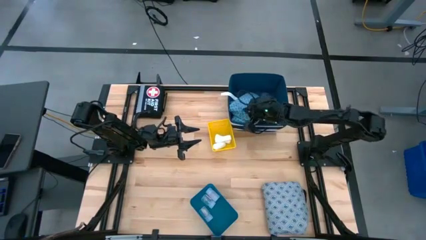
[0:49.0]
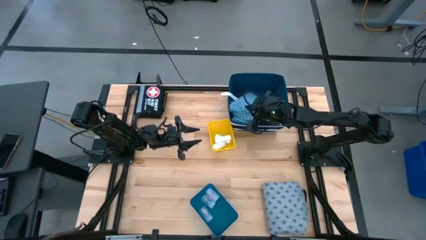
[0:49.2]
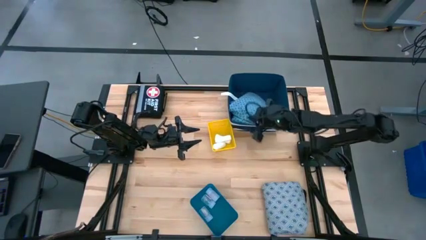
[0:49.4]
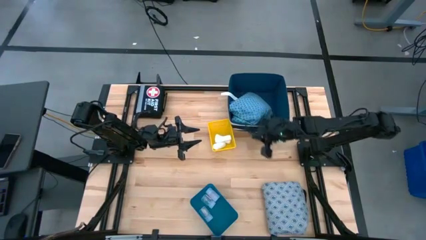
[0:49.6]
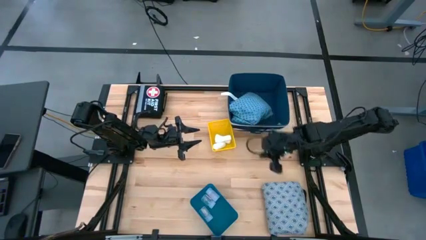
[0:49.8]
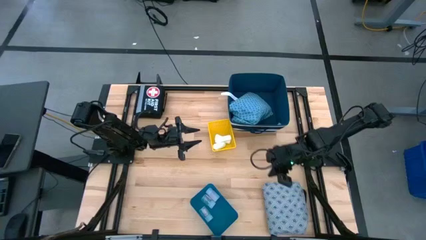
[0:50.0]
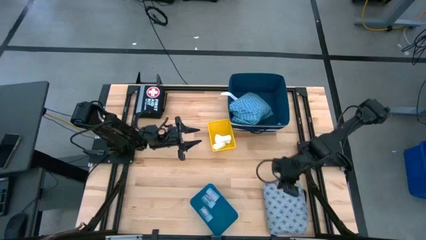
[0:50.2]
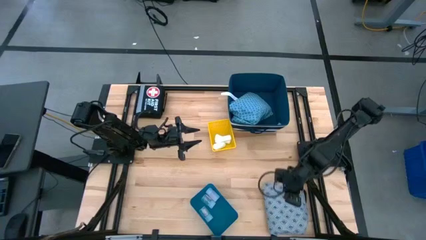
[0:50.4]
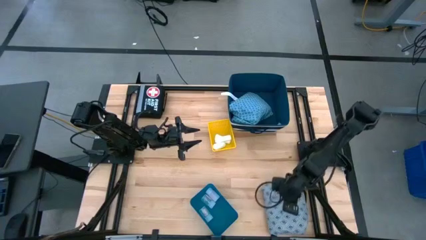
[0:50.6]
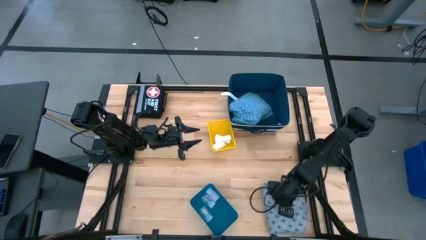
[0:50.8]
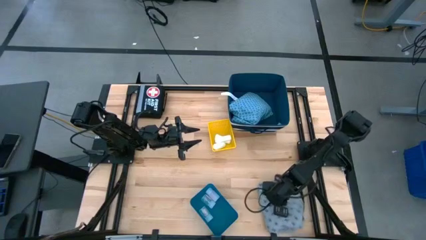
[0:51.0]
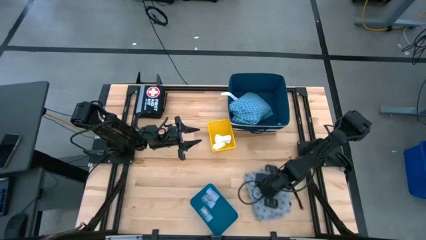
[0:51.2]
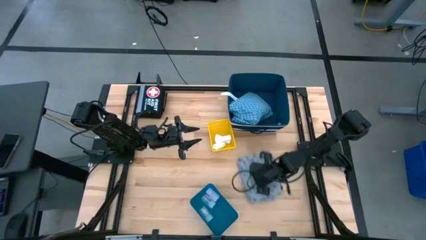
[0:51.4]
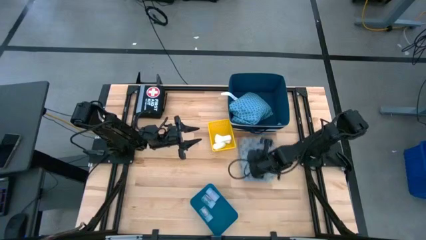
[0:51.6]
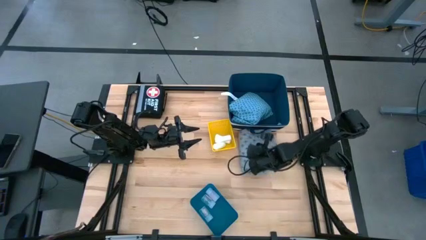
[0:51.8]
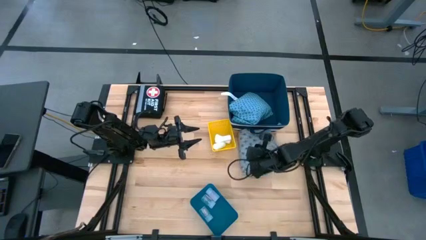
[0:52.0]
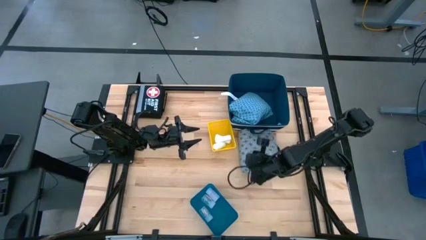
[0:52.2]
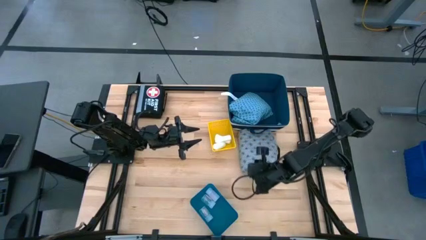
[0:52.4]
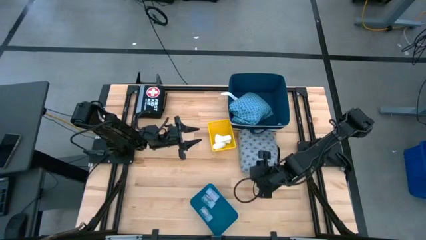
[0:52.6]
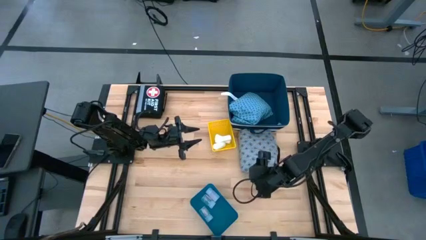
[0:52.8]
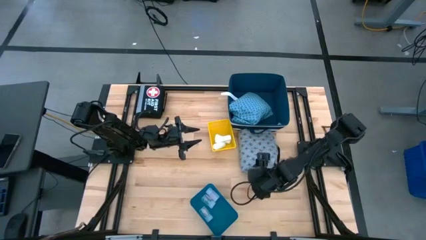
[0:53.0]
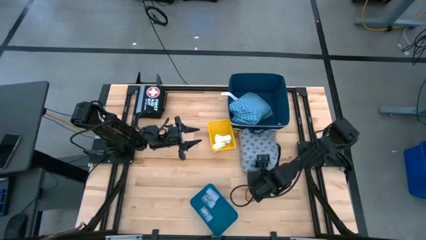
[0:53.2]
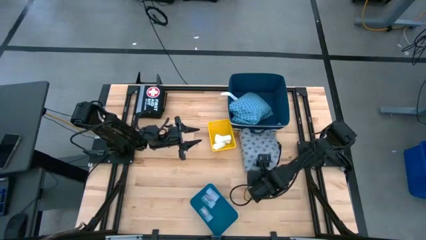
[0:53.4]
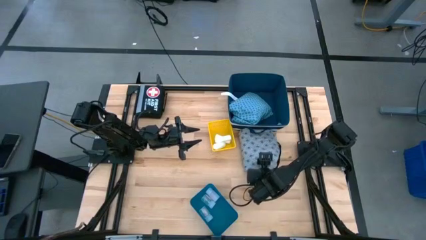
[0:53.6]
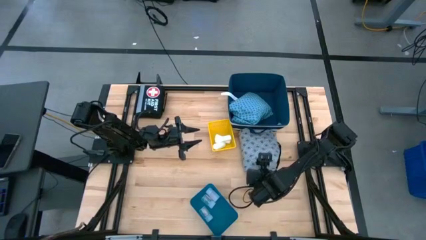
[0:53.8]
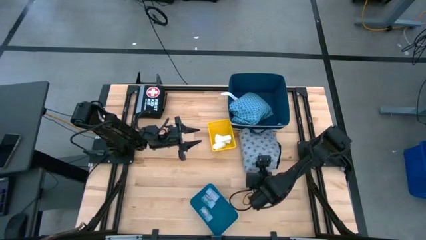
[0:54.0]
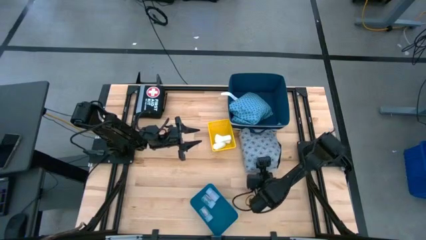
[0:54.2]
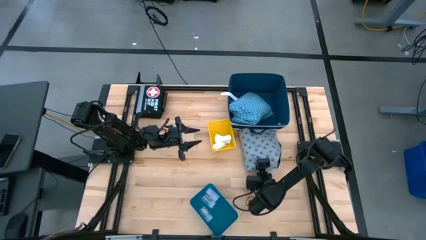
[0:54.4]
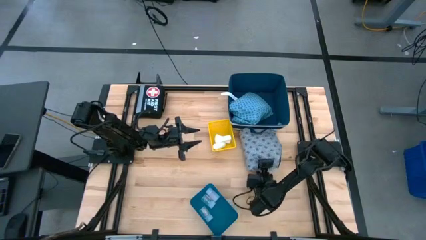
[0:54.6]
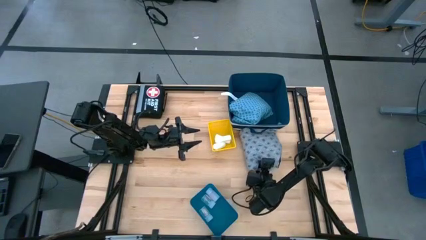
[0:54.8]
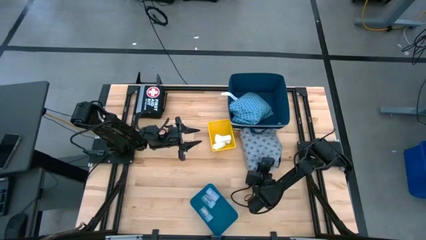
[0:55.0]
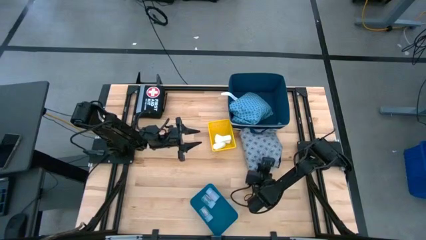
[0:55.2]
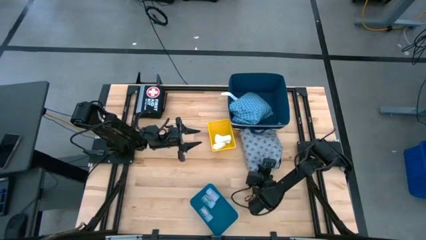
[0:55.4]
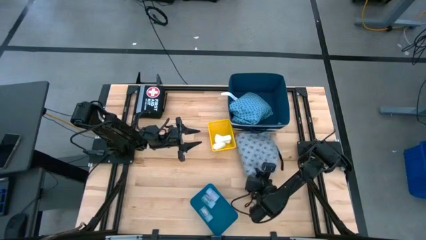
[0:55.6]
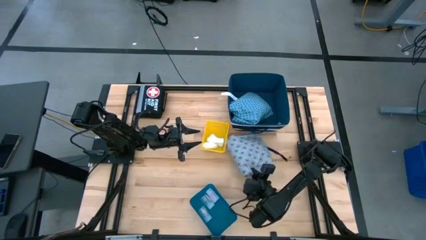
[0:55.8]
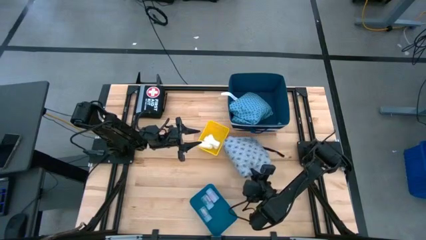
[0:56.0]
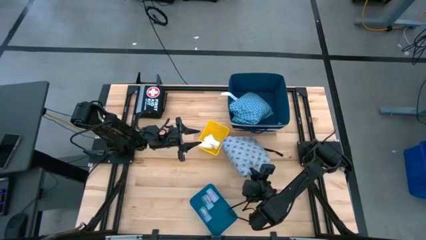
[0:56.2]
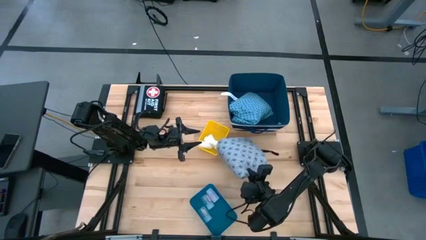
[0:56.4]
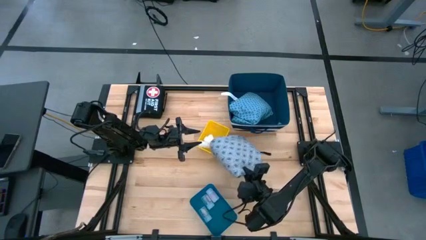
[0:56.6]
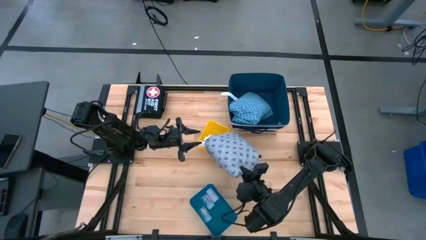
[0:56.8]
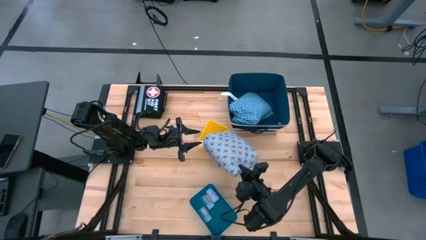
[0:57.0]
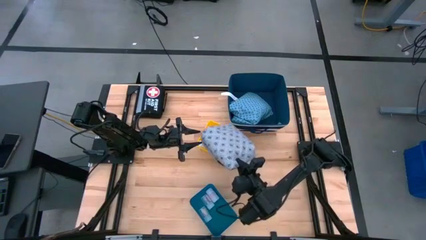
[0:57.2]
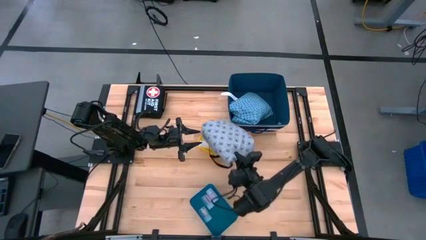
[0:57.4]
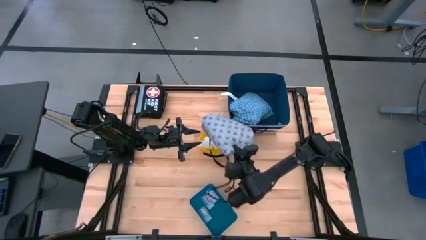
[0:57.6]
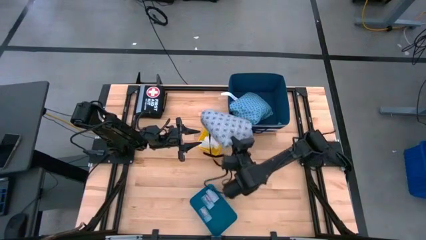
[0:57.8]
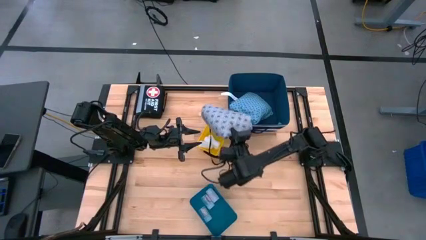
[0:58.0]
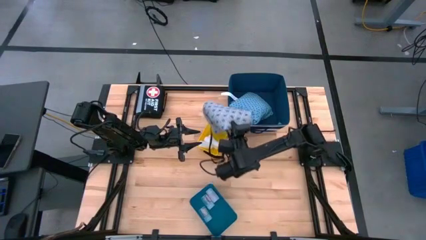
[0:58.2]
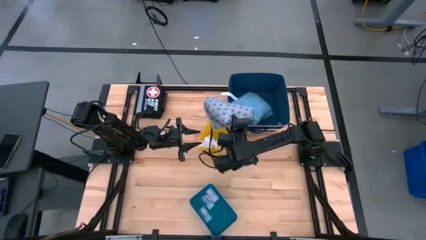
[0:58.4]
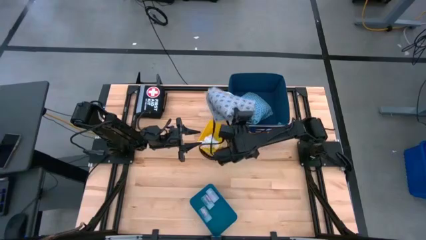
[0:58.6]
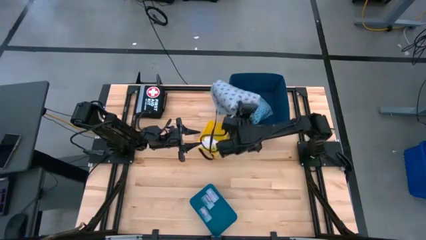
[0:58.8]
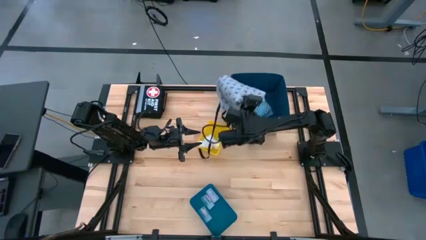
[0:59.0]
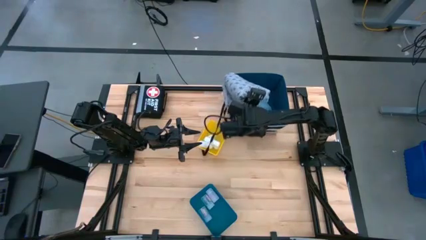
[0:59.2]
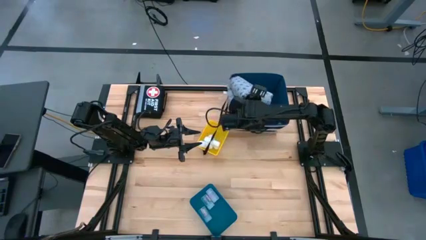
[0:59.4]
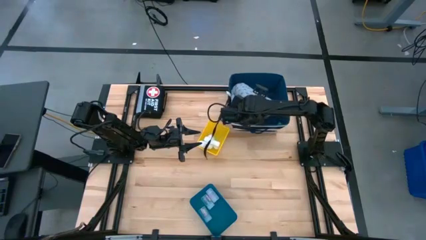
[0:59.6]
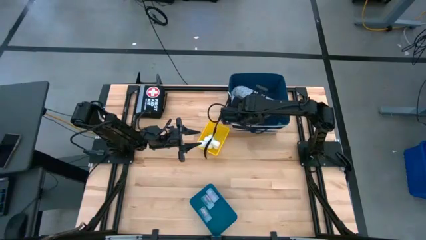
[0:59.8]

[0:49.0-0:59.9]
Task: Pick & place medical supplies in basket/bin
Put the white patient gown into the blue and white bin

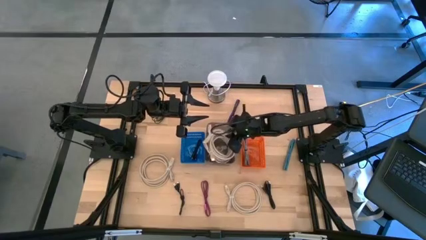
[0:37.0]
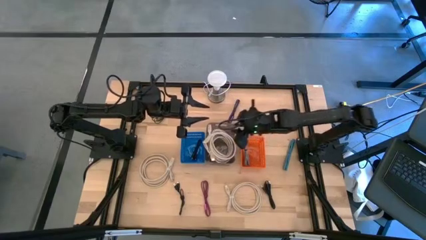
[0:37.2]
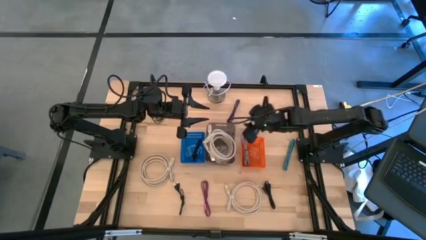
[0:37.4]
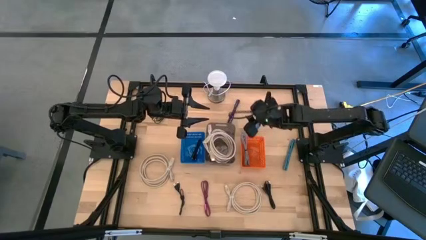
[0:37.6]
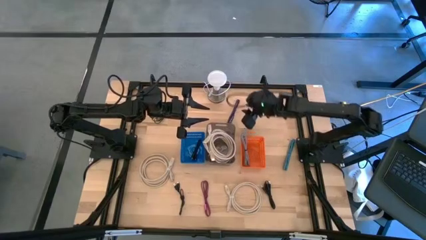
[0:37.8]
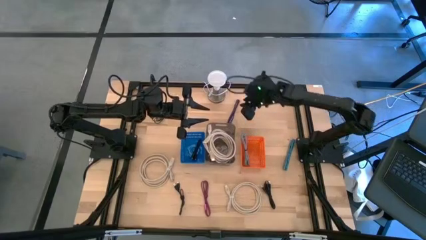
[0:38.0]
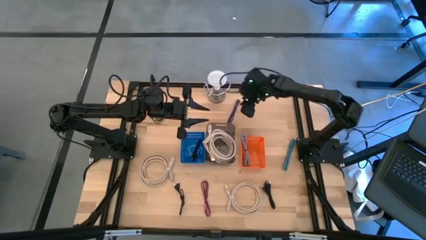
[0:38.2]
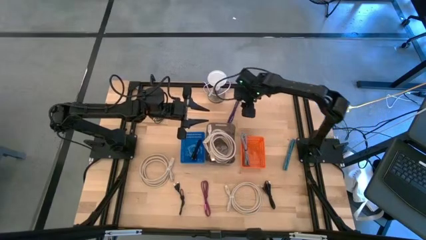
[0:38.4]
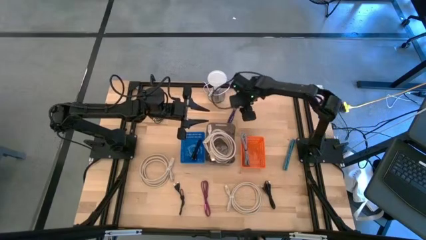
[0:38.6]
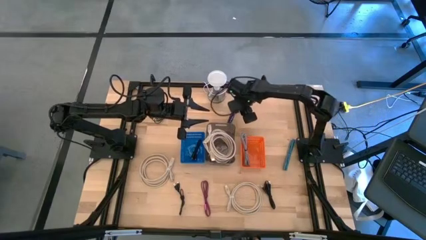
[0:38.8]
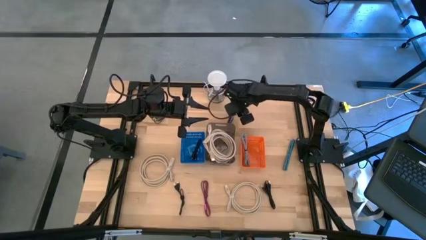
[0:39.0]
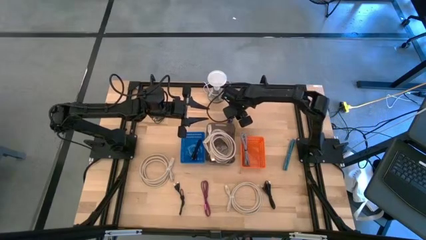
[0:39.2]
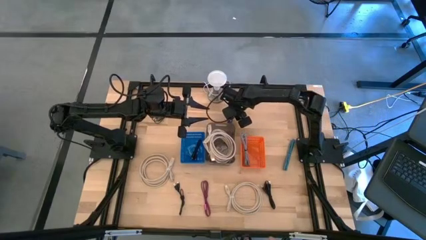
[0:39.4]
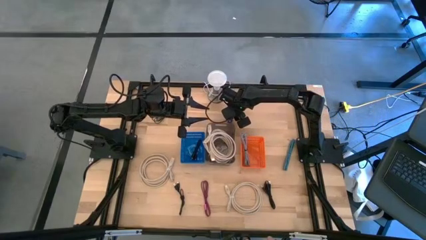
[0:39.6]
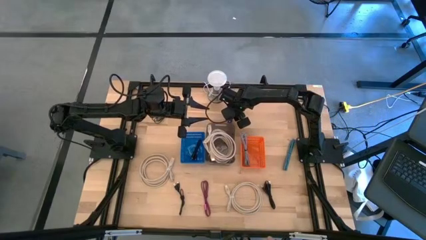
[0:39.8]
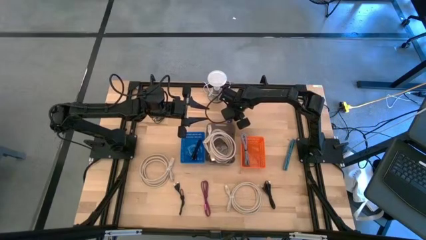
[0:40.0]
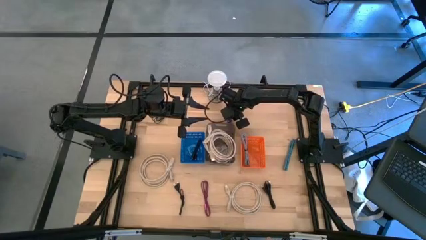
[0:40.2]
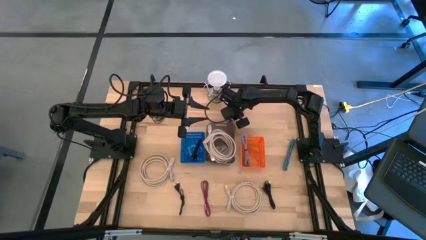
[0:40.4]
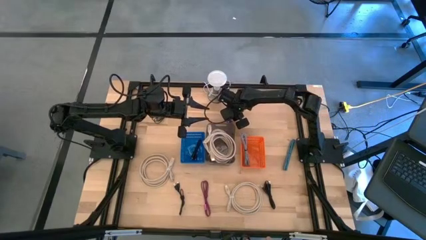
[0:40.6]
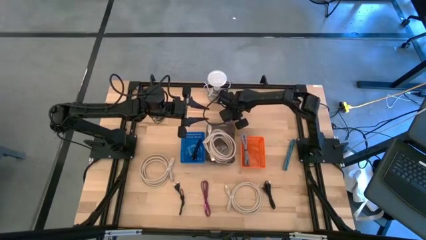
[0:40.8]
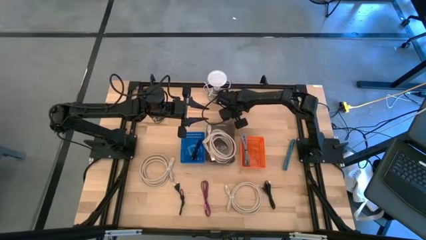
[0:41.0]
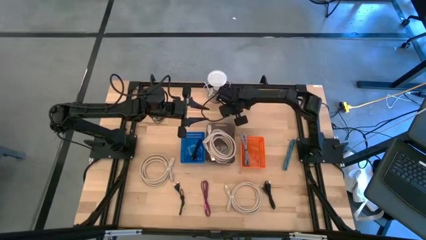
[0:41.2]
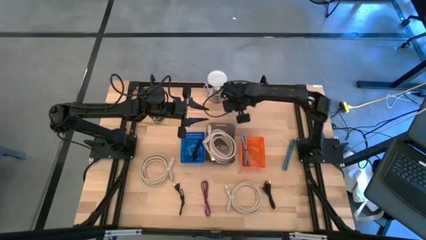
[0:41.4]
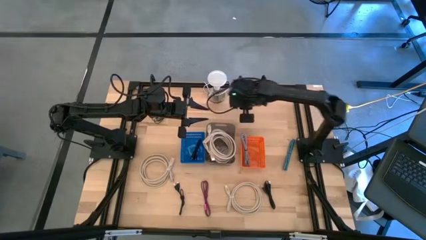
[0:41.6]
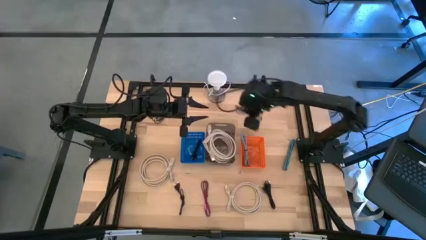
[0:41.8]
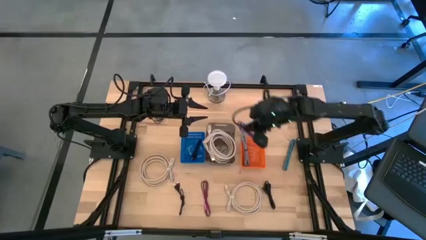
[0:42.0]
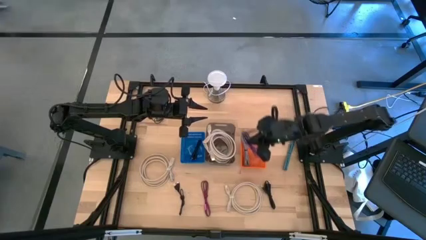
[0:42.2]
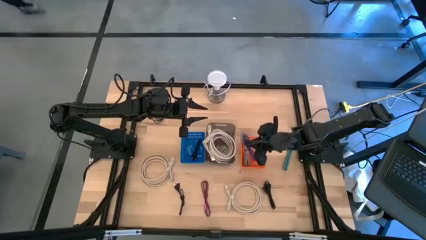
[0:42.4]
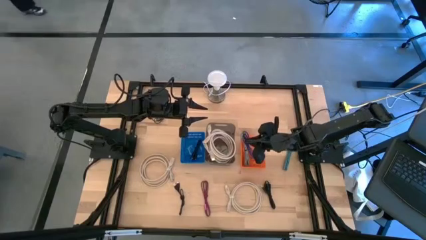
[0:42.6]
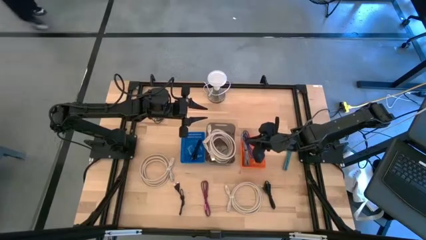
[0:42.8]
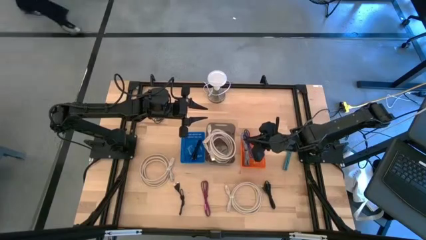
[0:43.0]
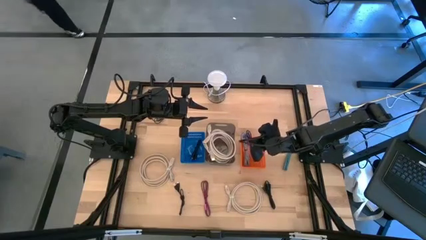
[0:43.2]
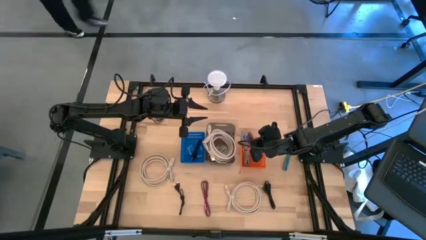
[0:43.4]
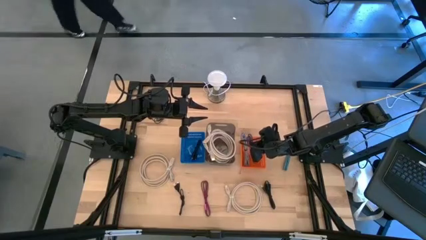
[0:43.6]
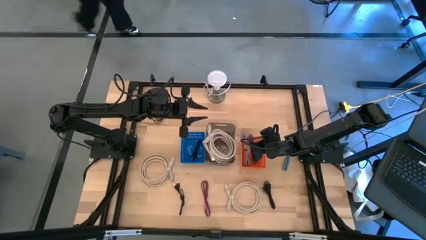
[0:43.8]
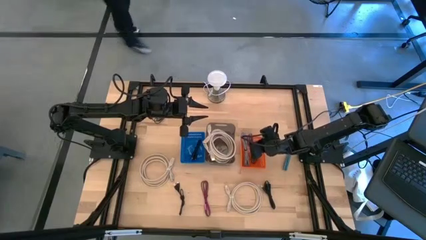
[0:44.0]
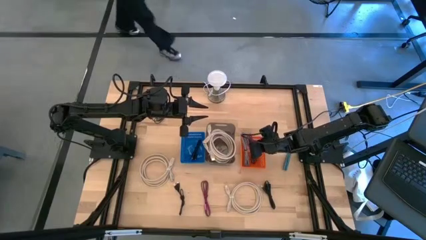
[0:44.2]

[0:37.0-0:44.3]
Task: Pick & Place USB Port
Put the violet charger cable into the orange bin
